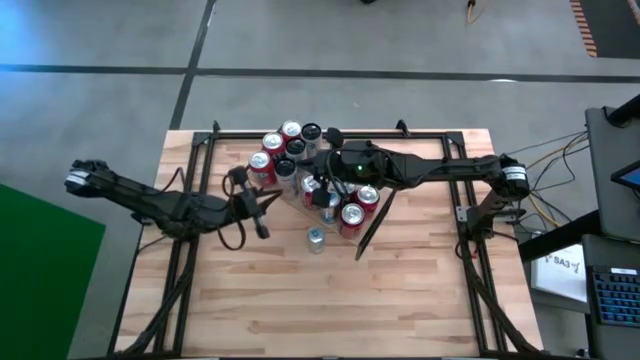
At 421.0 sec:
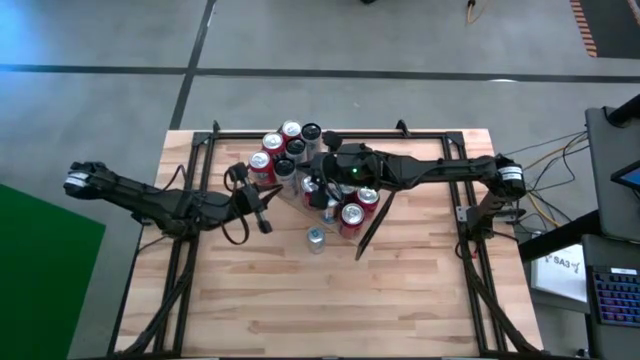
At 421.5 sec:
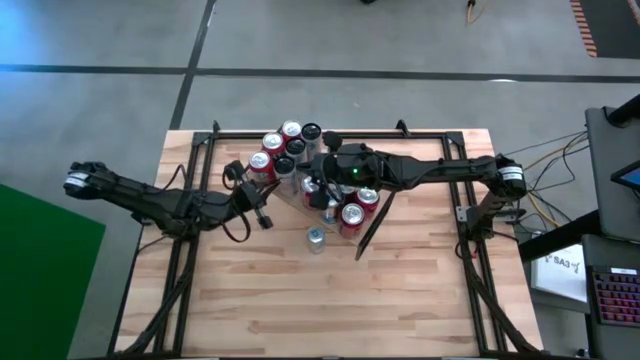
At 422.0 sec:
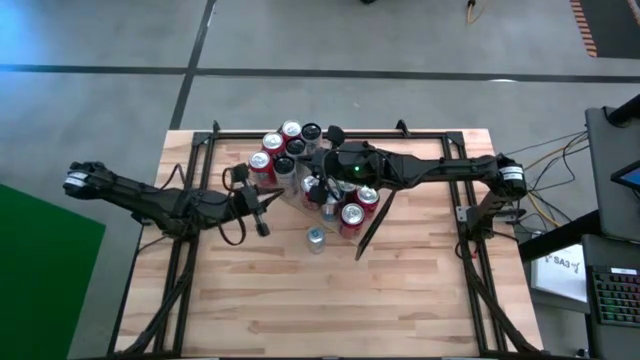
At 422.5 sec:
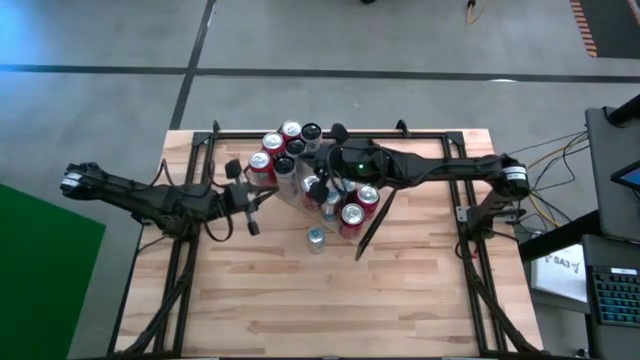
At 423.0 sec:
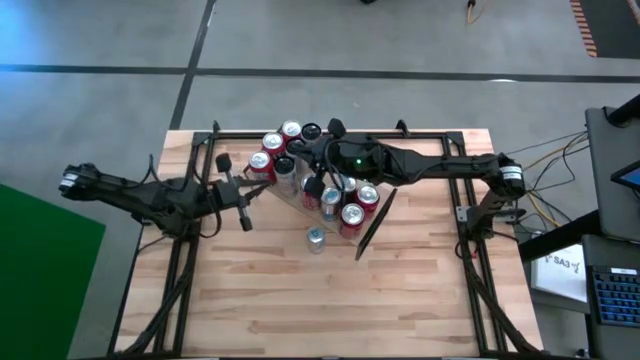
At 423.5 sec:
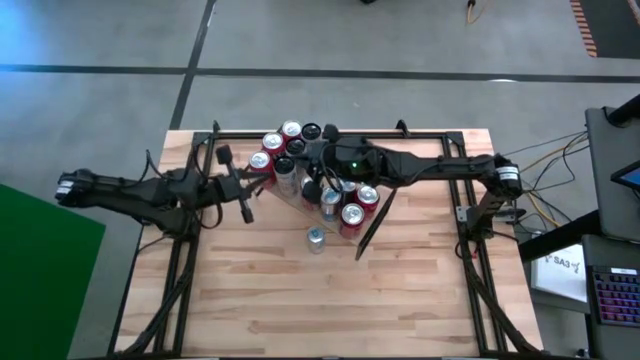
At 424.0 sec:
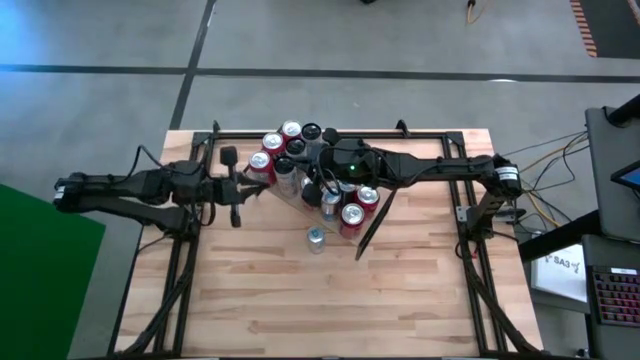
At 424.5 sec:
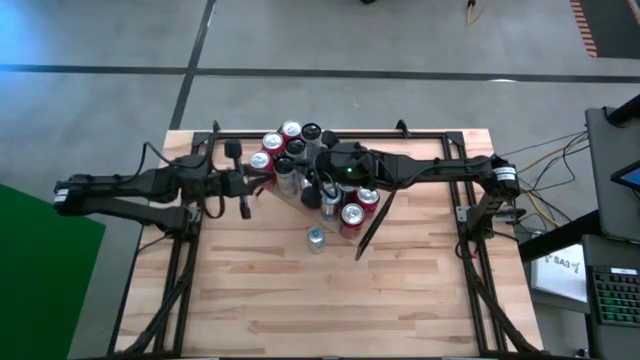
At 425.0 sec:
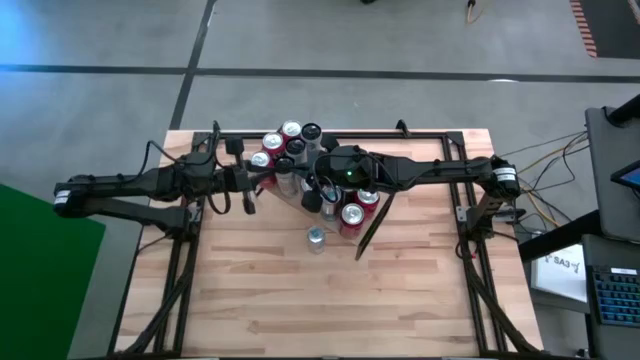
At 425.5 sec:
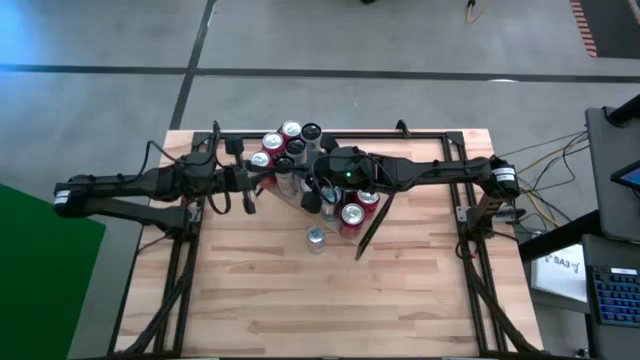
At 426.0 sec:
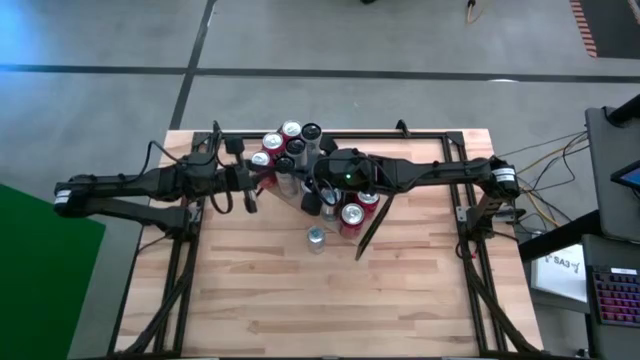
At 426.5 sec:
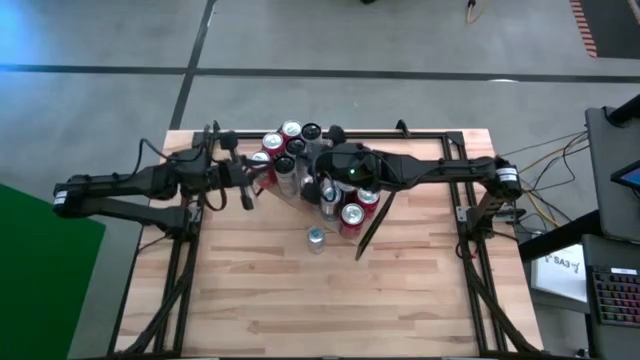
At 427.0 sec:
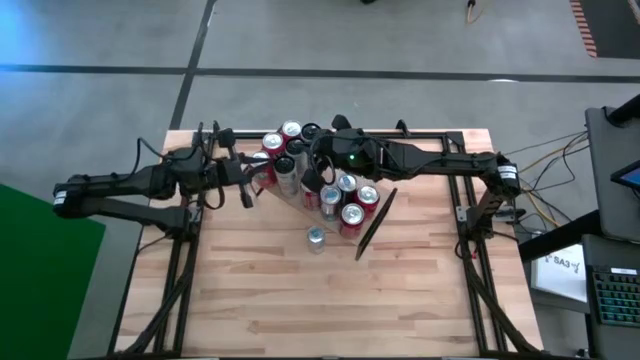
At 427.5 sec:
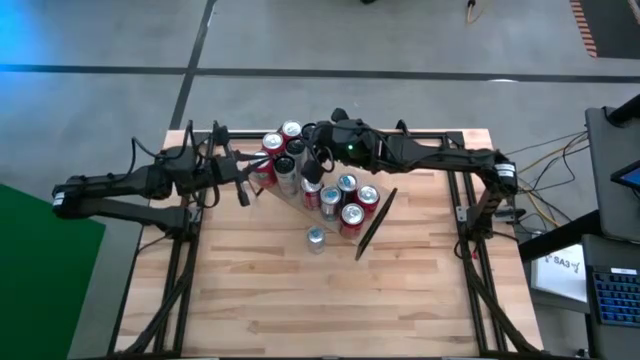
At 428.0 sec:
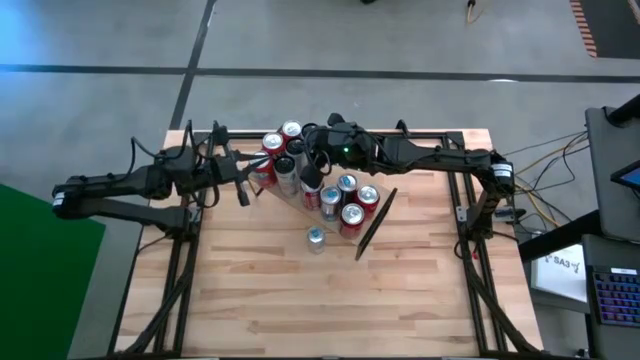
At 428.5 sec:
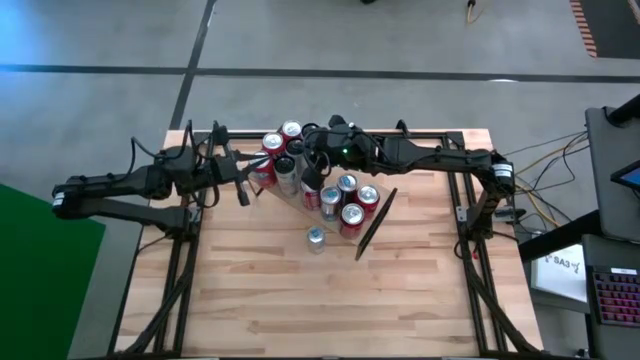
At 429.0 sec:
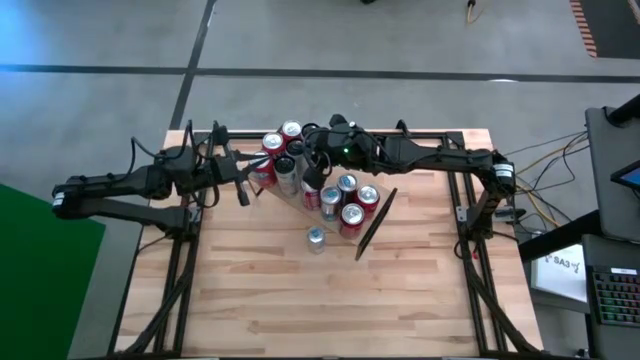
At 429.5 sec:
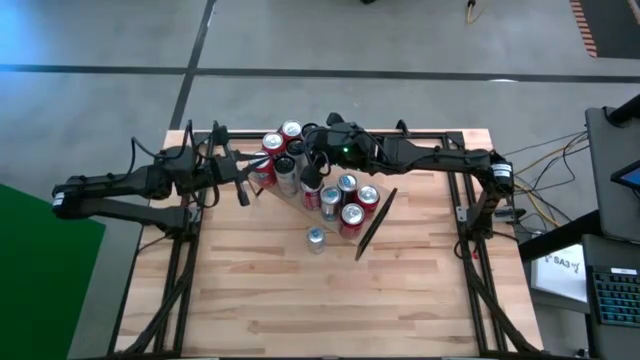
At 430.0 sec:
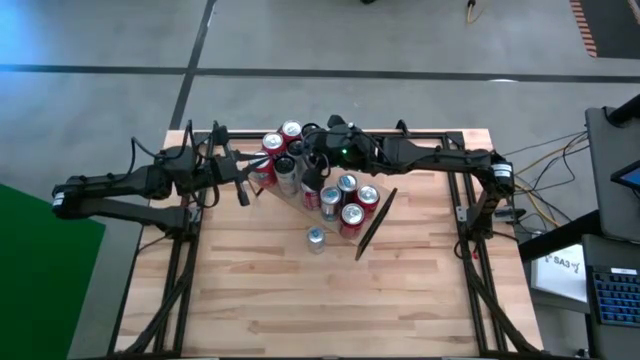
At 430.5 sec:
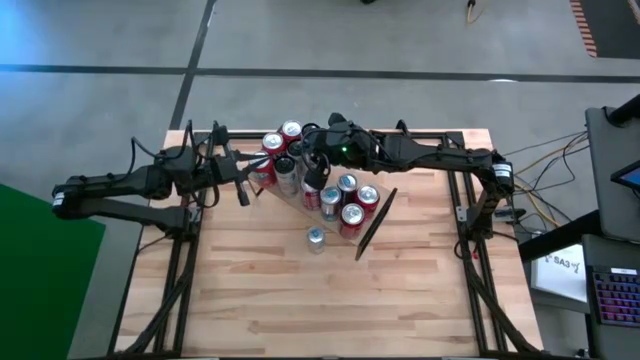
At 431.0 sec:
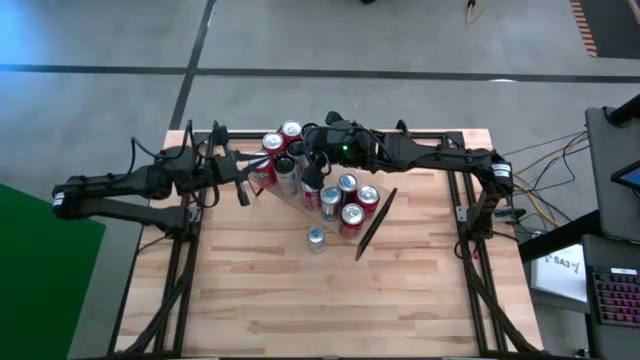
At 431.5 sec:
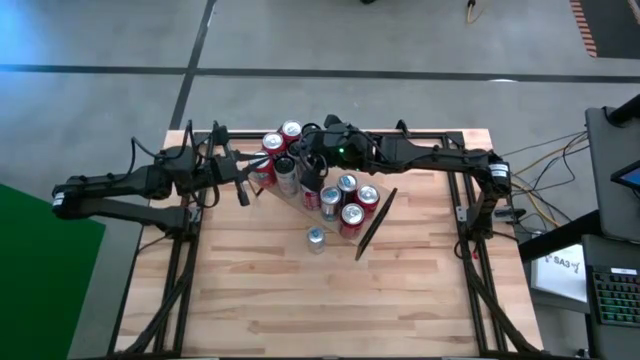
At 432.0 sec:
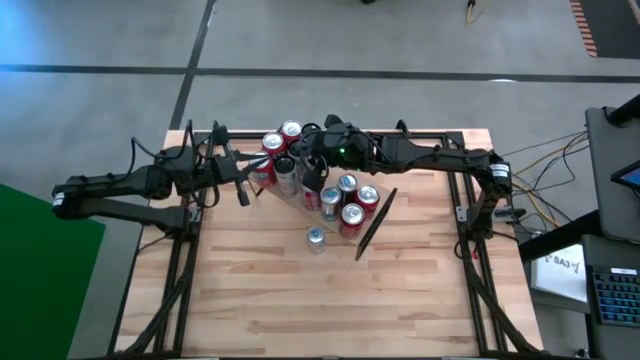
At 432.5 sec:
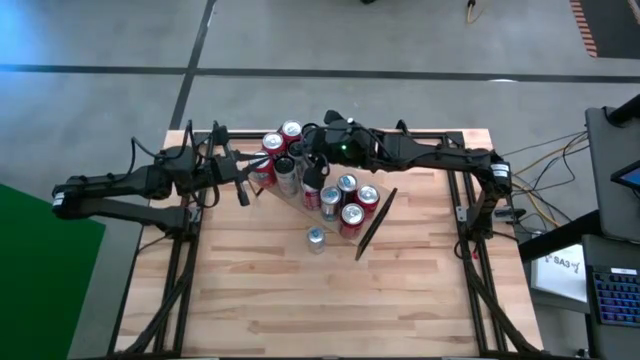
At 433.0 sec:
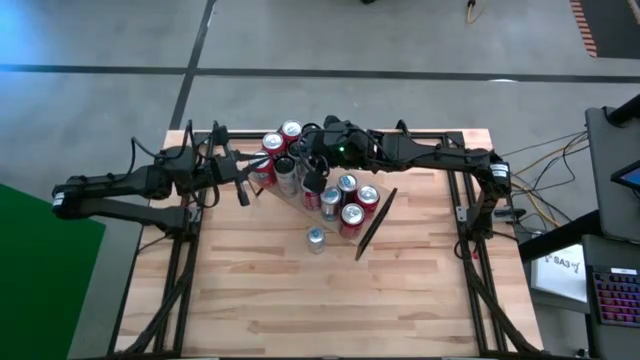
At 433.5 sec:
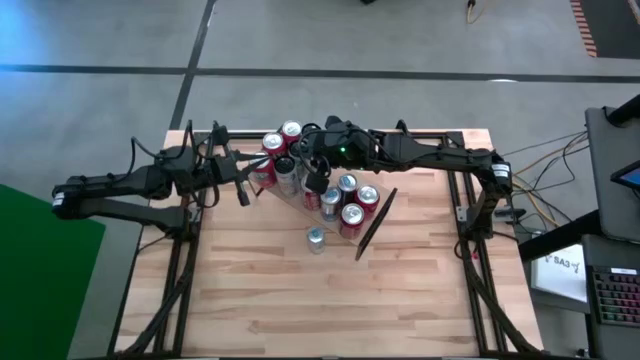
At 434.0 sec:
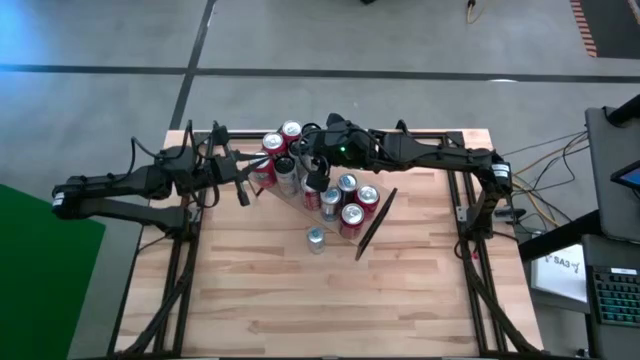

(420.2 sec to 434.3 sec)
Task: Place canned beverage on shelf
Put the white/pink soda can on the shelf, align with the other white/pink soda cans

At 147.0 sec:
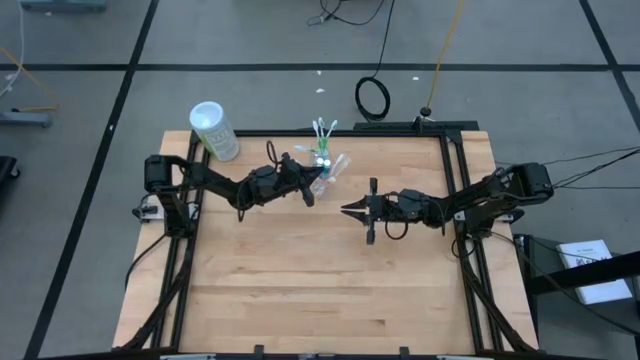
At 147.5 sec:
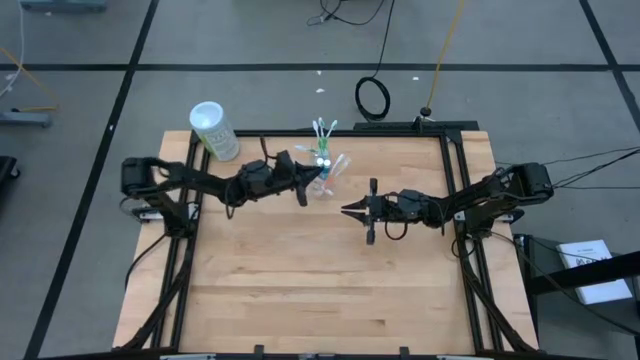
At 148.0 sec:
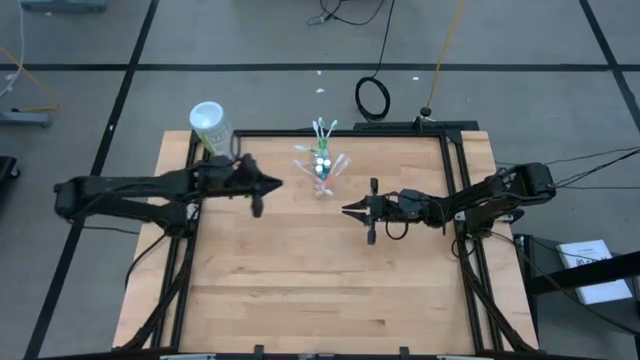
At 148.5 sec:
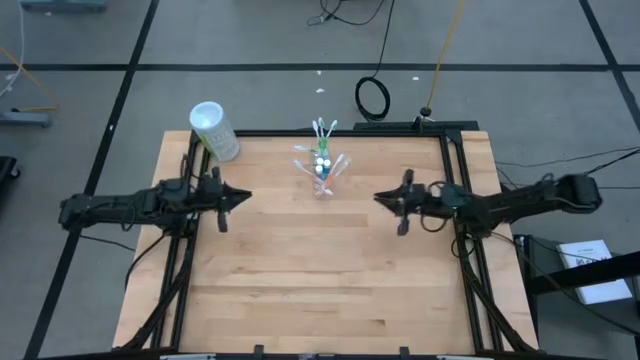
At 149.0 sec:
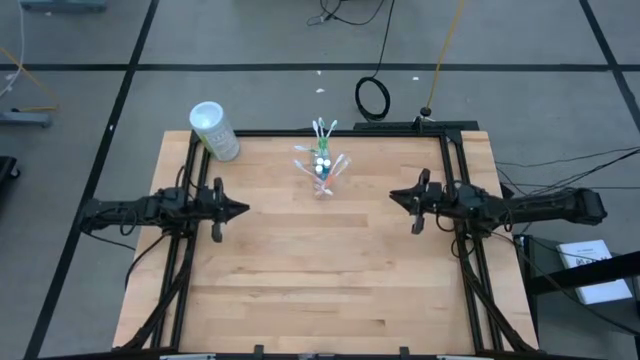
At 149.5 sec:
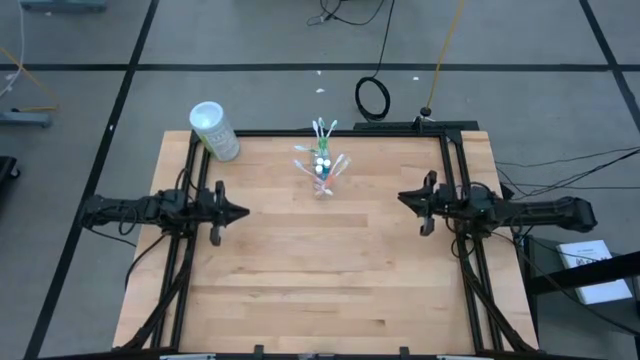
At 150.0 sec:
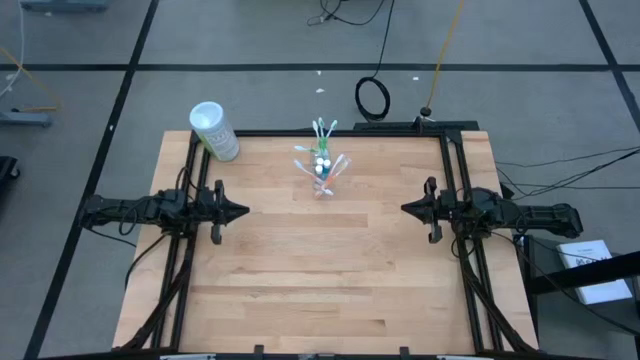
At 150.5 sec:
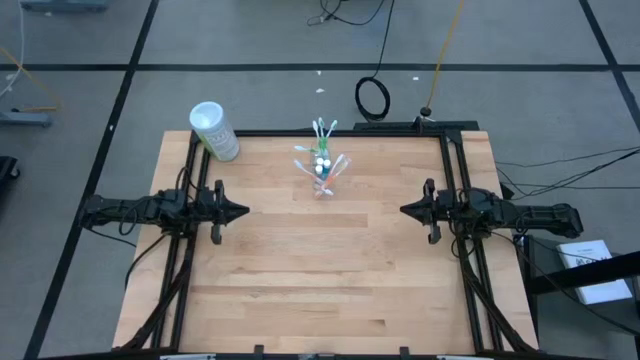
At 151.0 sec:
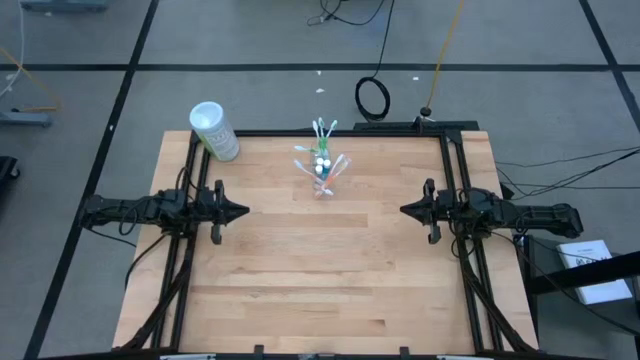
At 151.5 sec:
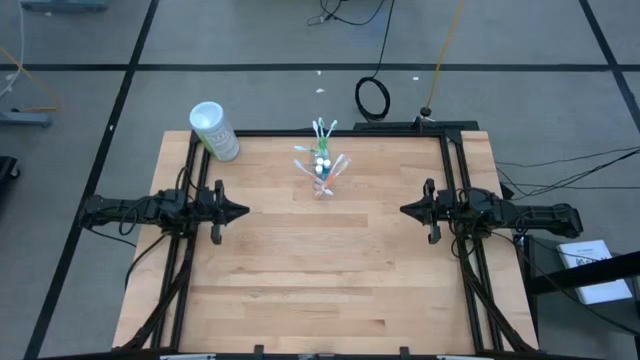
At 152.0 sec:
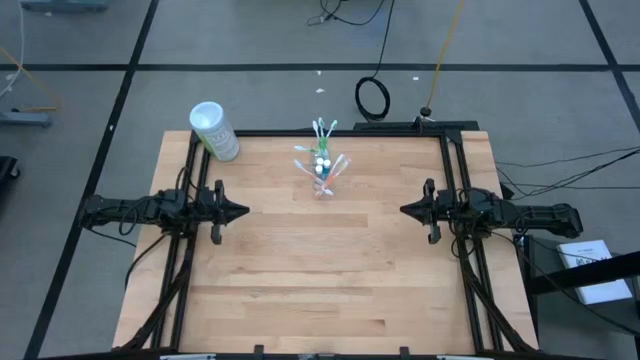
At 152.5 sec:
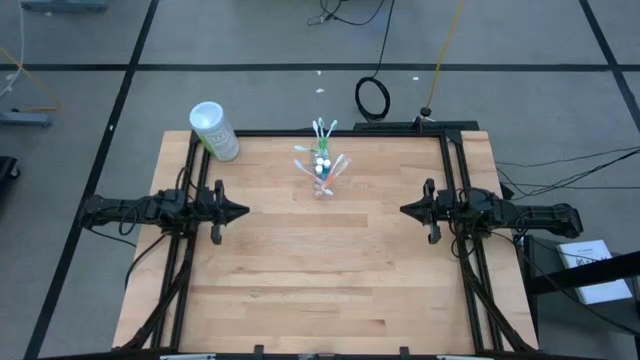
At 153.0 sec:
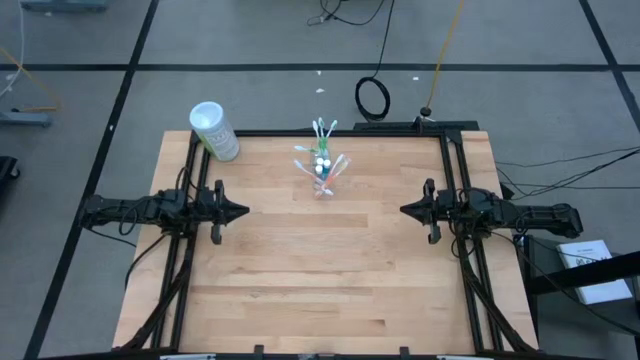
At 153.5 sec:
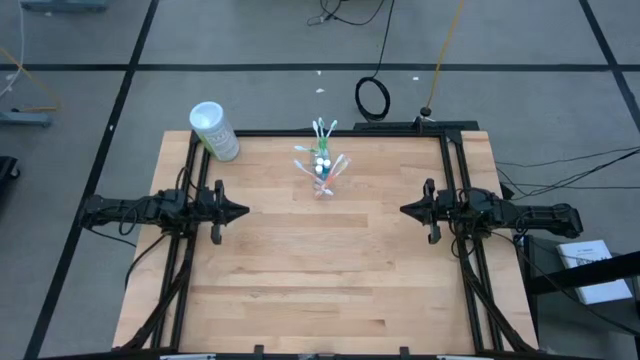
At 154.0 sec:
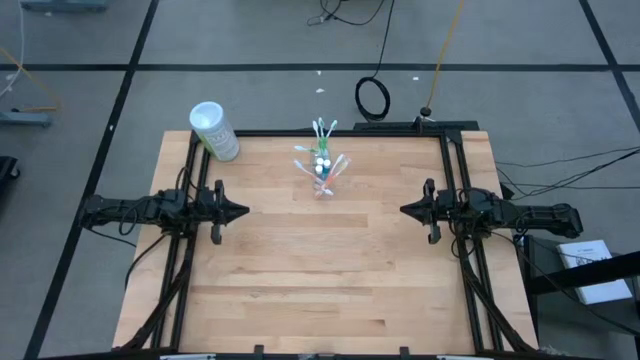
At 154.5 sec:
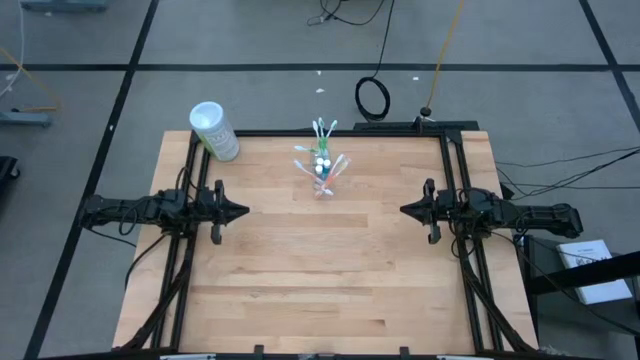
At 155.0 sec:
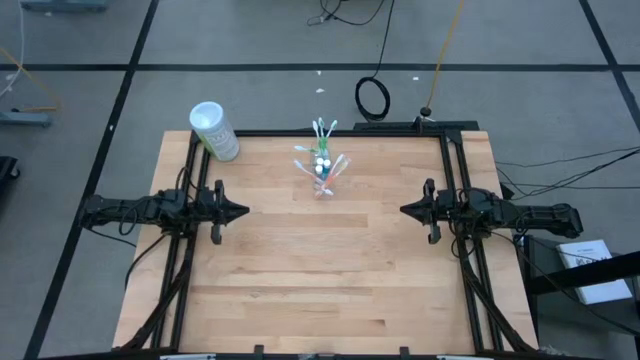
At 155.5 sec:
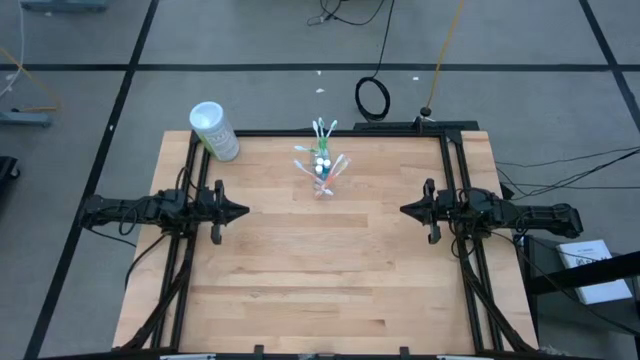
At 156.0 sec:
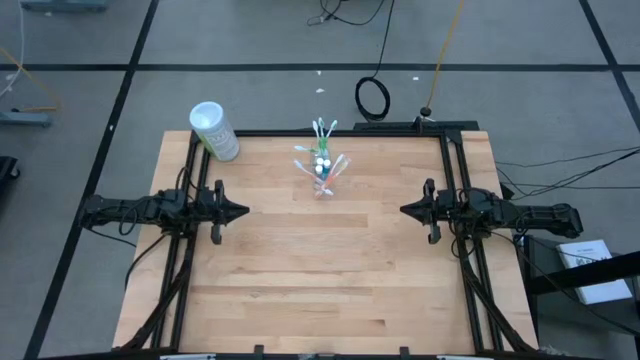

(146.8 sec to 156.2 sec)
Task: Pick & Place toothbrushing station
Return to Home Position
